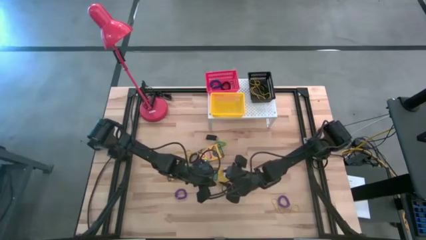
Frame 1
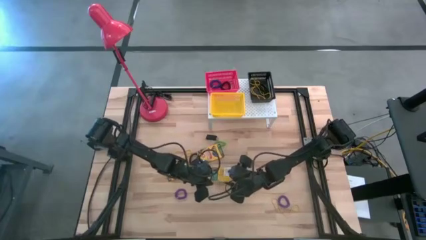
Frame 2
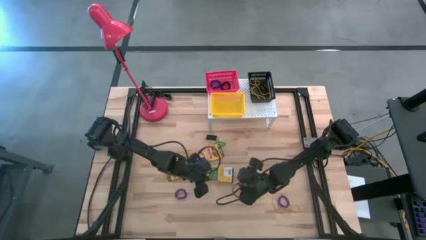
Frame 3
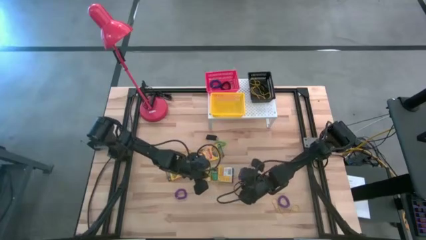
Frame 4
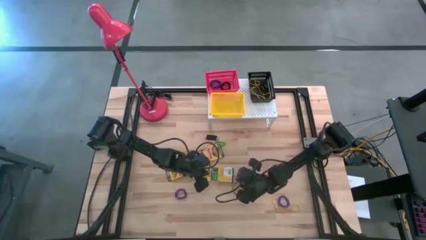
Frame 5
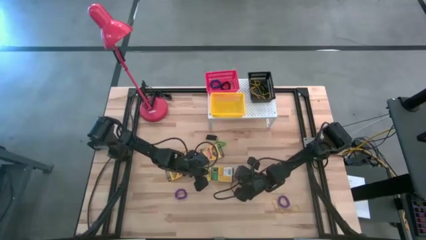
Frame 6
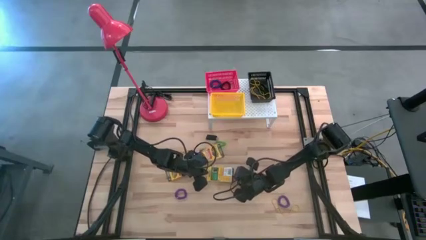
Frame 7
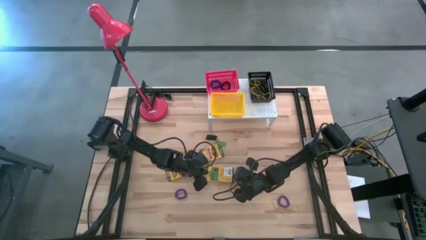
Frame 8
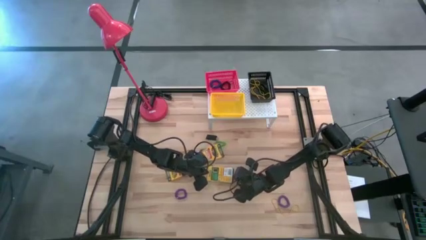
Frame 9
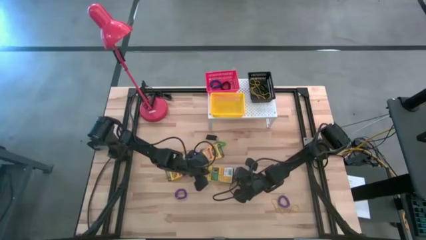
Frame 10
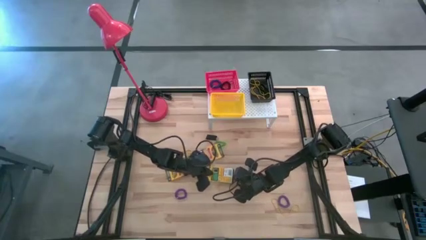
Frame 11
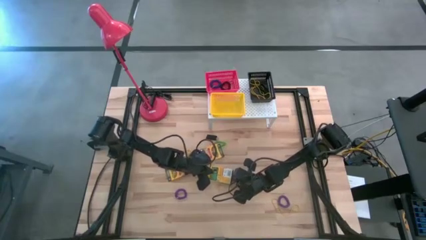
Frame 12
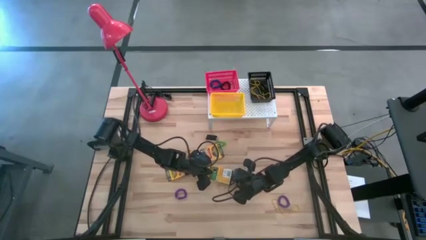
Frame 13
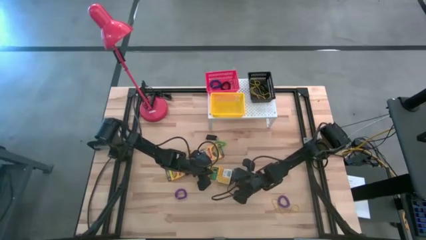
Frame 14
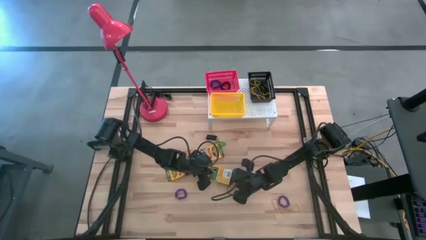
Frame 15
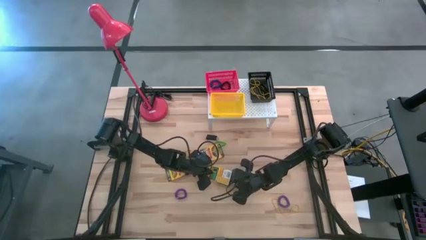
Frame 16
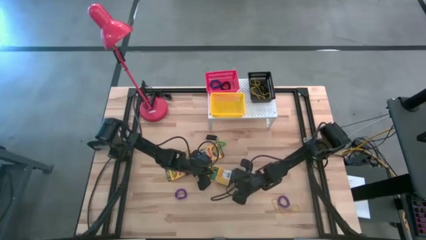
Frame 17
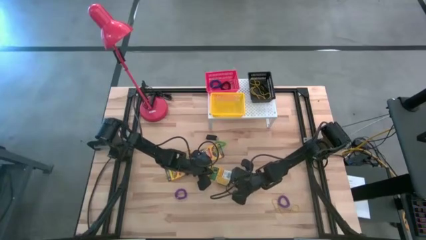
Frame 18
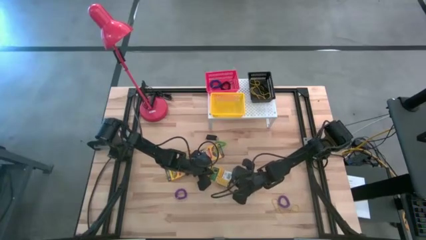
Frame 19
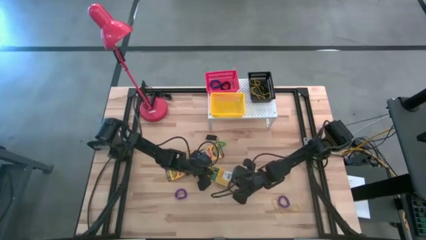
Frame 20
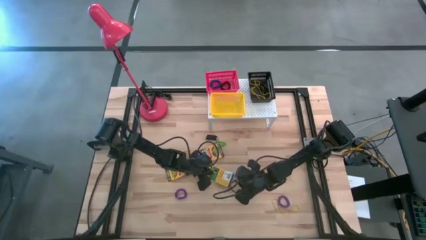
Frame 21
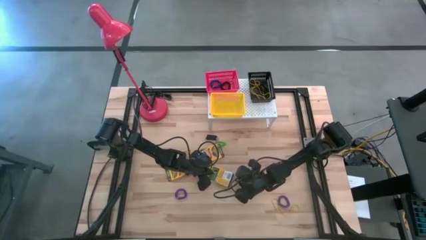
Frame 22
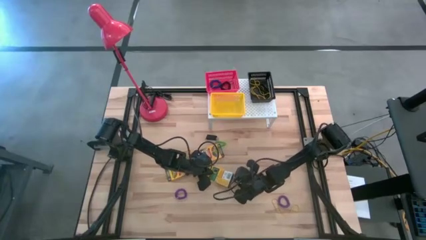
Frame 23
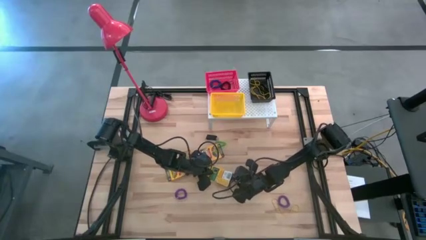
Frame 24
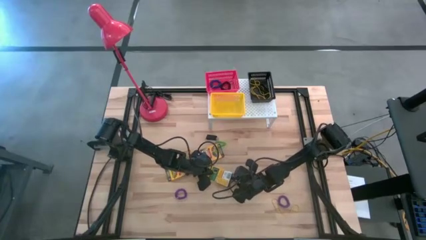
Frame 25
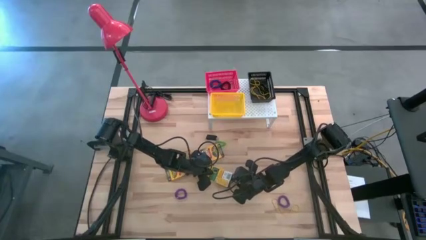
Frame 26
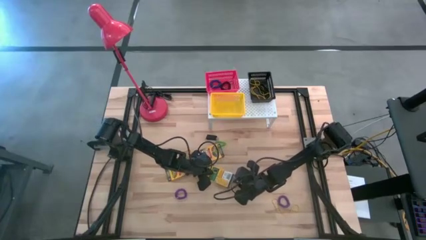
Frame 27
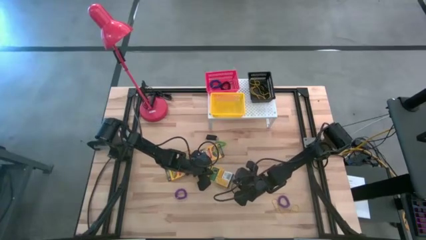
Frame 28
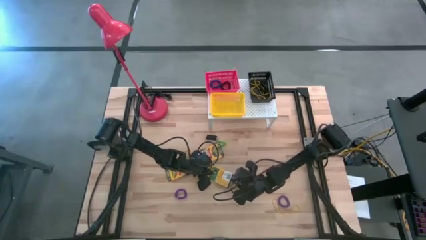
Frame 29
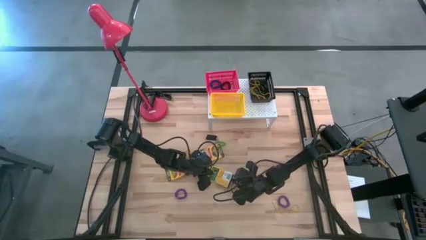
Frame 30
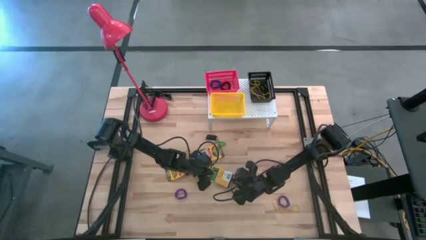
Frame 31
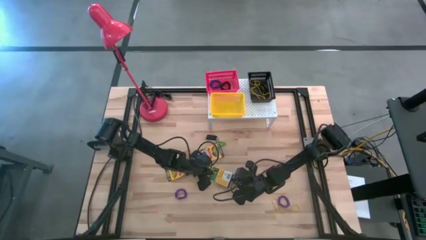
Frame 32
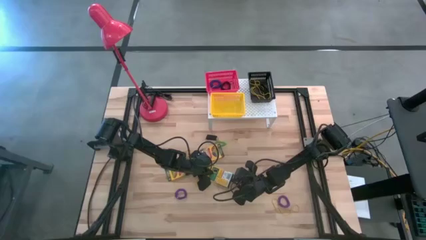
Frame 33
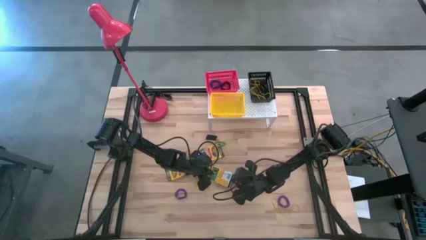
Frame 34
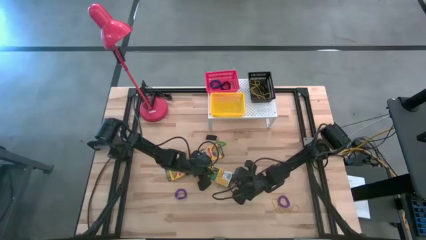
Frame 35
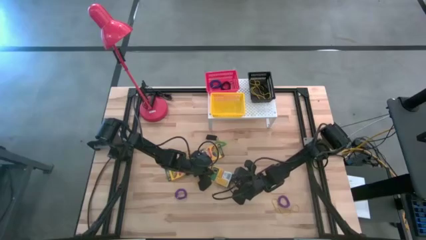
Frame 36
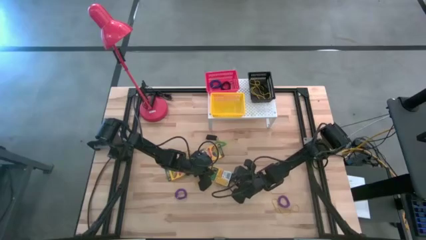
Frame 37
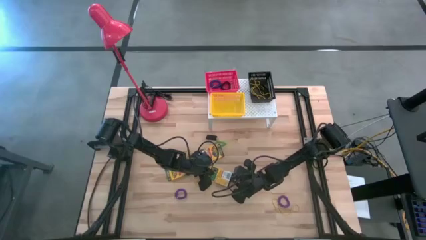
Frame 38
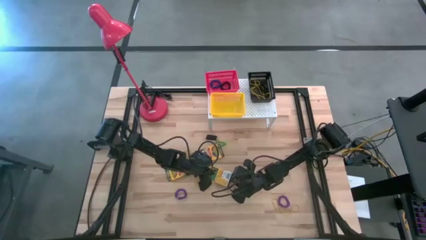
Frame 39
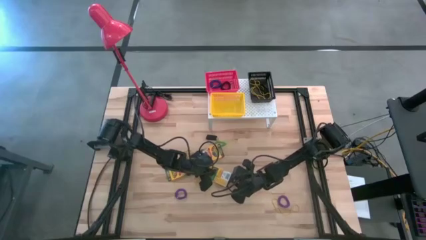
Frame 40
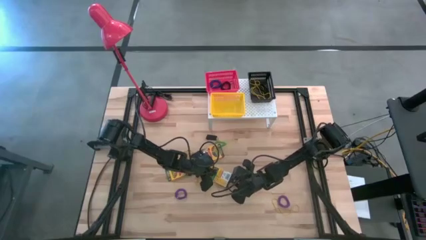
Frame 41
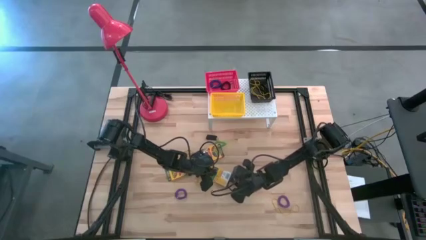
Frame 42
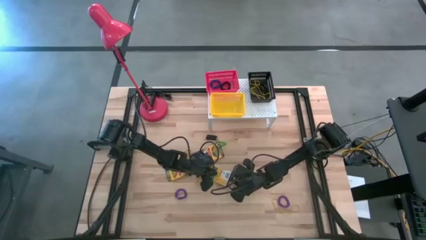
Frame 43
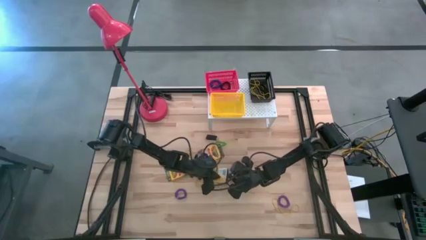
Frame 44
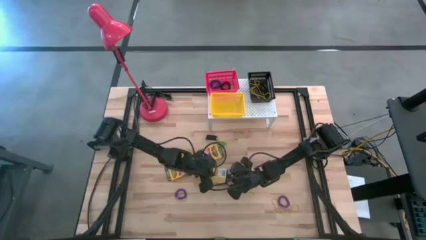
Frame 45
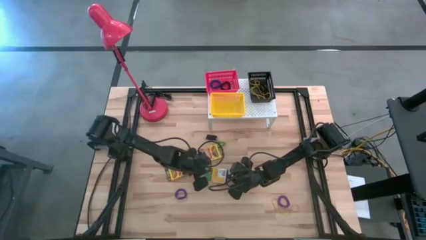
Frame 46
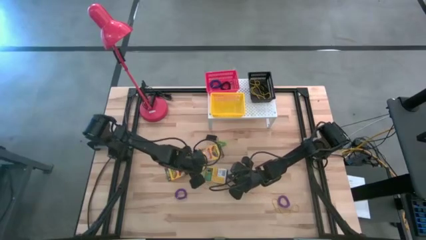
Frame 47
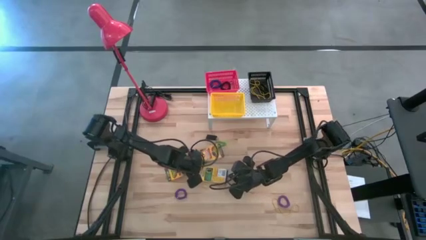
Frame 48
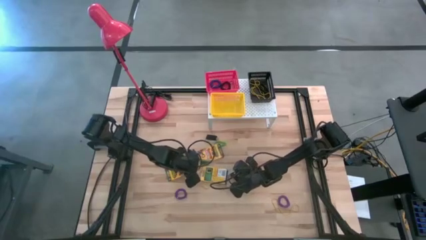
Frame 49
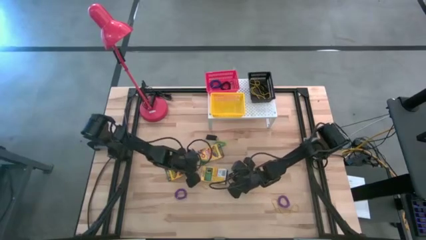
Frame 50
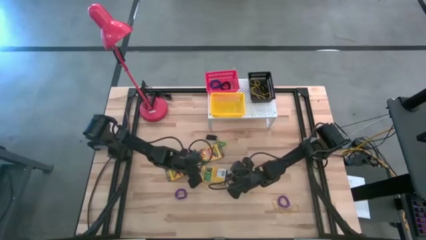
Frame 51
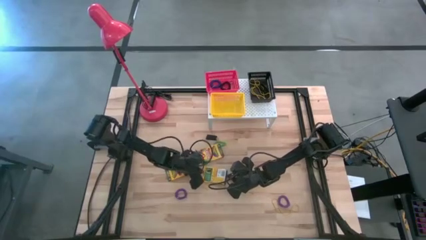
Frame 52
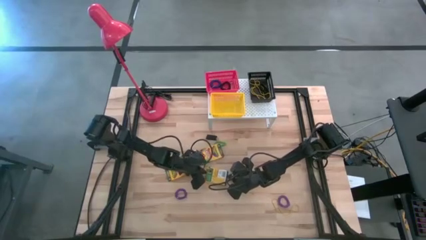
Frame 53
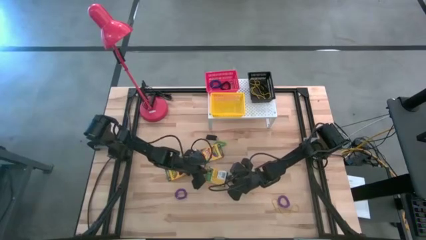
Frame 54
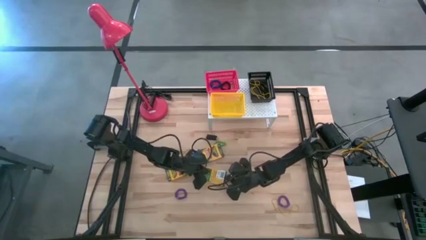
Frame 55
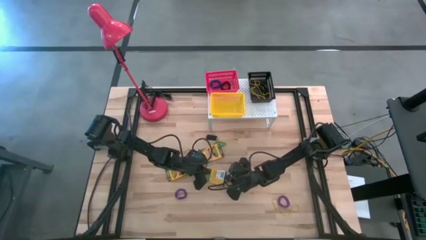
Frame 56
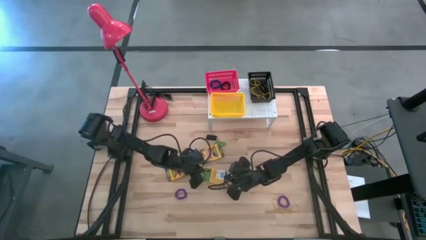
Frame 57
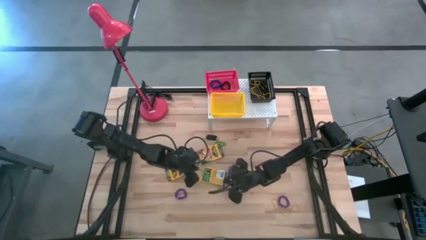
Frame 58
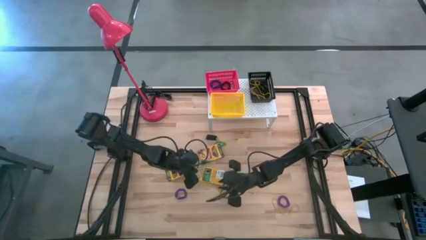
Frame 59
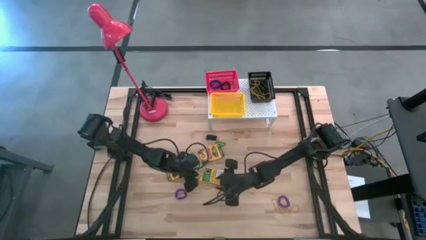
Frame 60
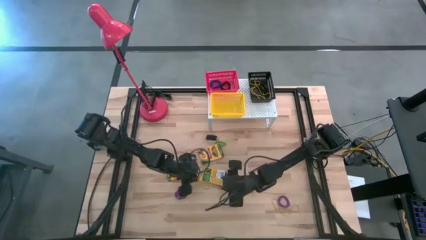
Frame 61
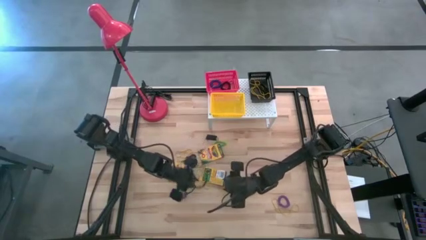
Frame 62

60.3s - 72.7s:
Task: Pick & Place Office Desk Supplies
Put the crayon box into the yellow bin on the shelf

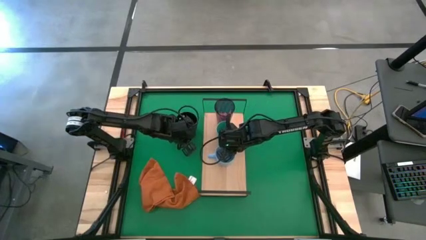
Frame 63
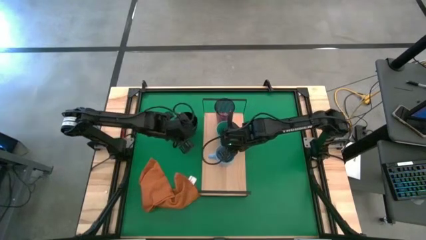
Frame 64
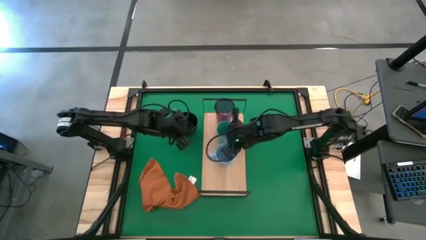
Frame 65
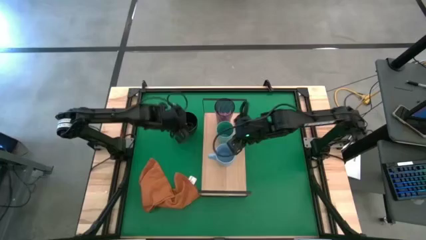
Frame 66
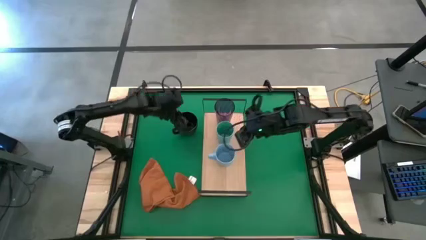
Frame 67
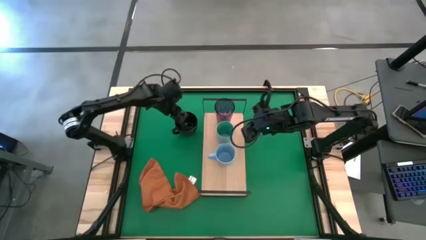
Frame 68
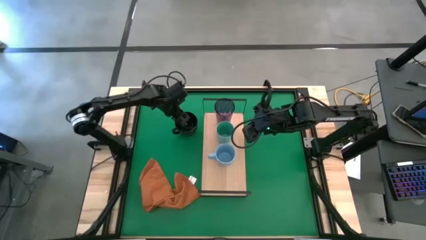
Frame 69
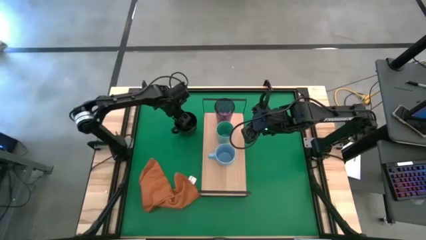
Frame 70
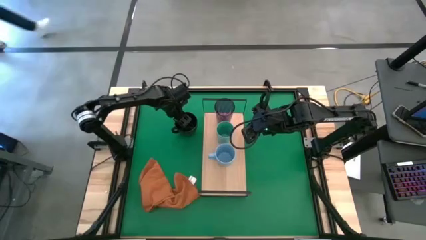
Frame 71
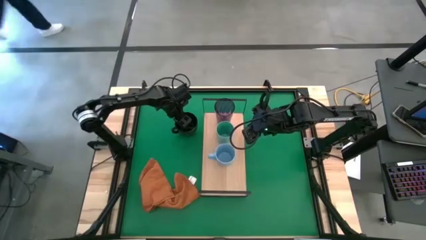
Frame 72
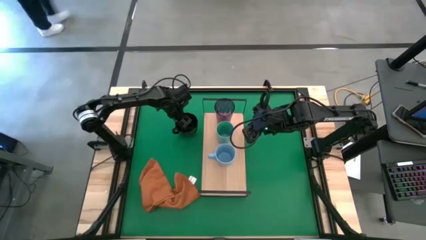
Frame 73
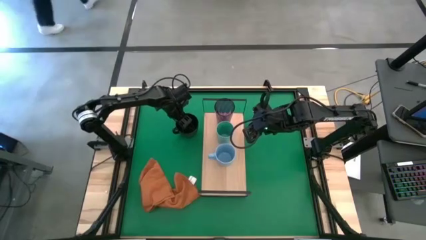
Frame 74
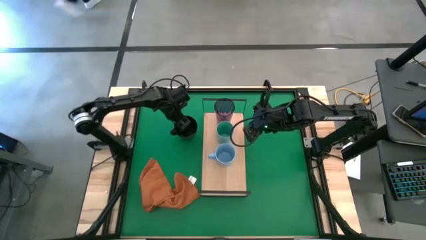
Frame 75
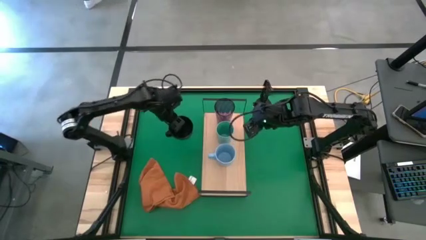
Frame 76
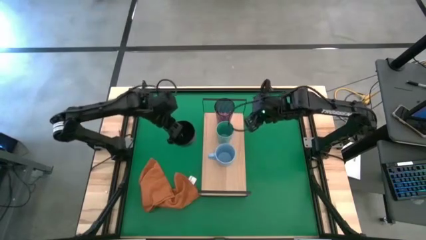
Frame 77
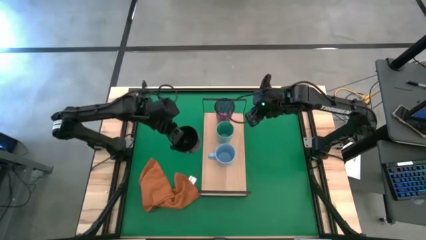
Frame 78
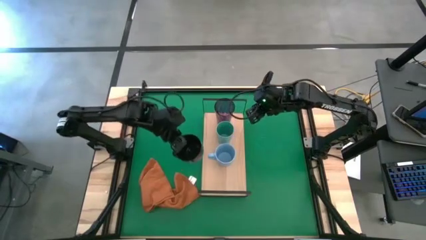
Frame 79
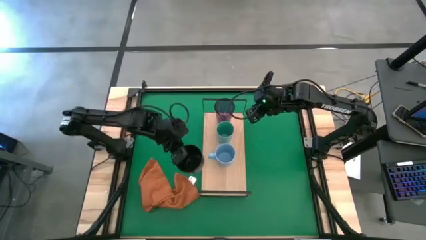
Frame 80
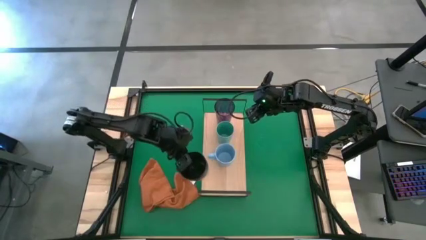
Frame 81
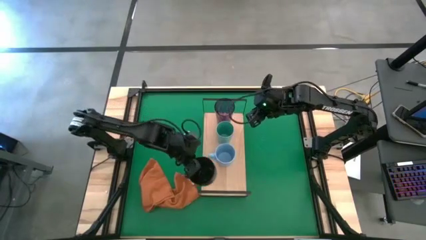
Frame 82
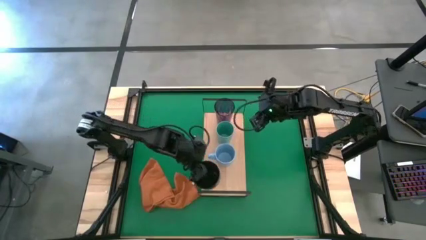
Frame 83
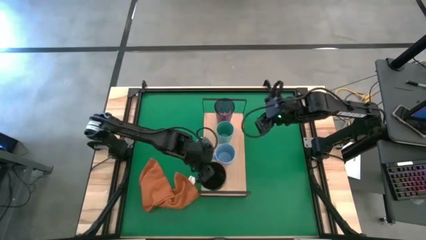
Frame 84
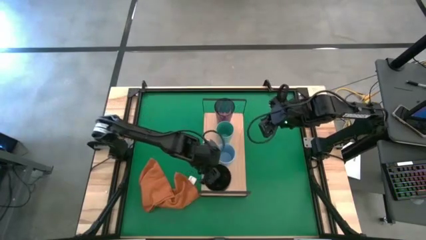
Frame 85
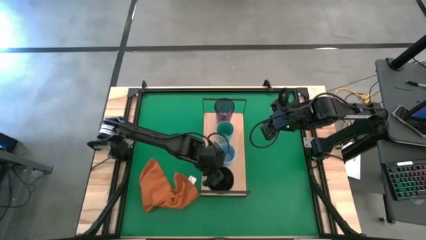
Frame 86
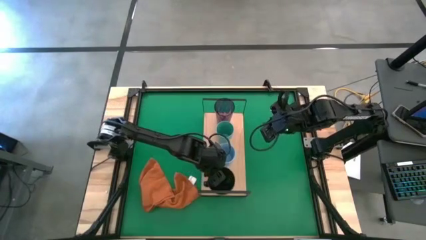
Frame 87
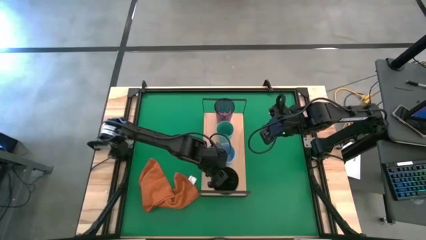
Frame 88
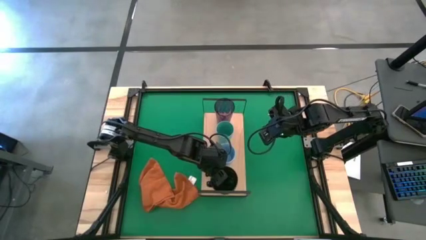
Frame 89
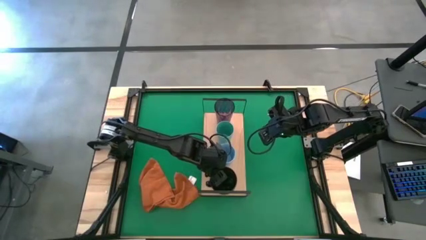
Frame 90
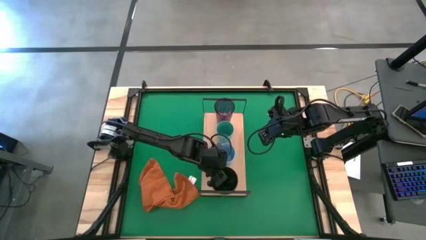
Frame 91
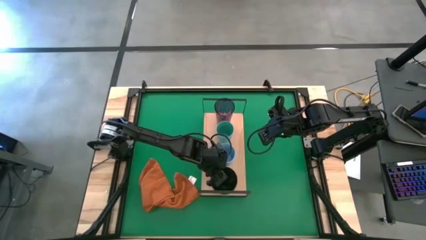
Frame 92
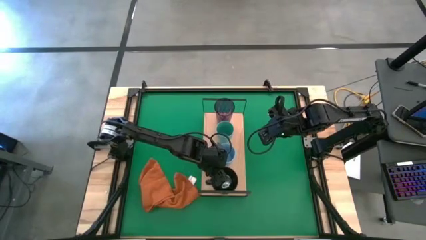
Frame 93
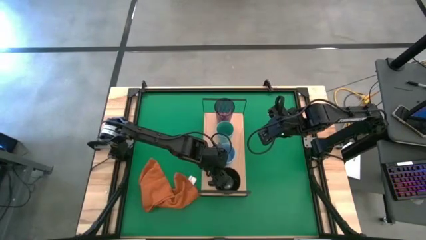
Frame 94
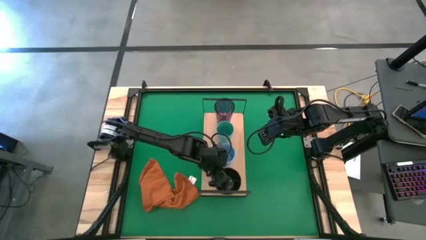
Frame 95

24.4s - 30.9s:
Task: Stack small to large cups/mugs on shelf
Put the black mug on the shelf
